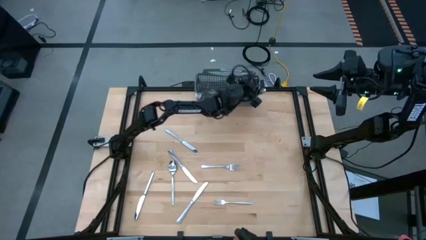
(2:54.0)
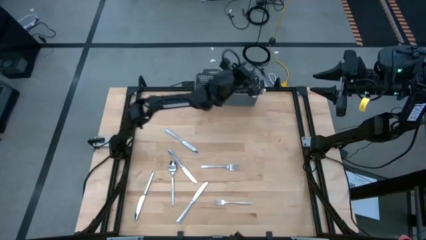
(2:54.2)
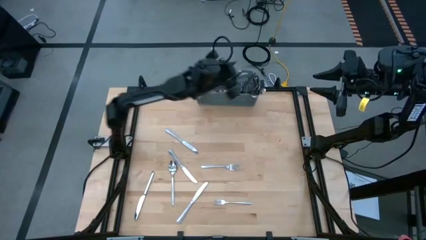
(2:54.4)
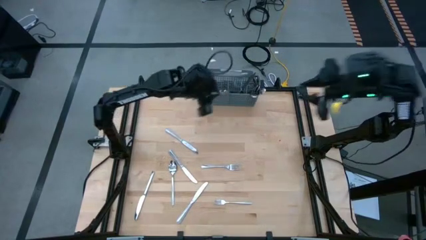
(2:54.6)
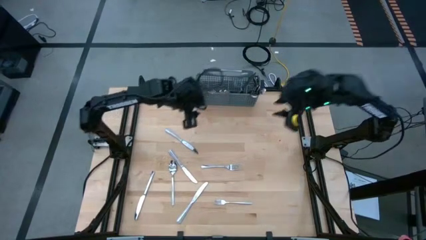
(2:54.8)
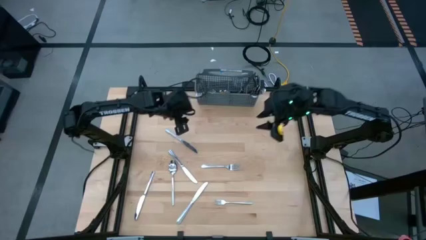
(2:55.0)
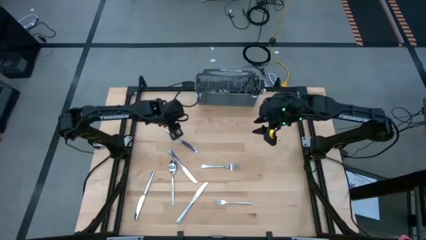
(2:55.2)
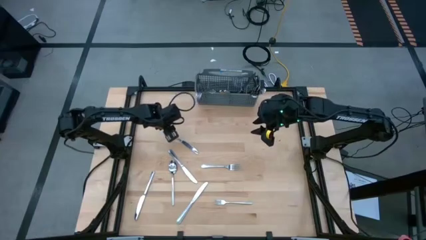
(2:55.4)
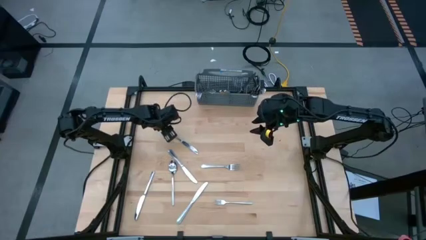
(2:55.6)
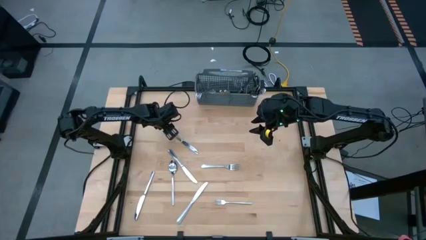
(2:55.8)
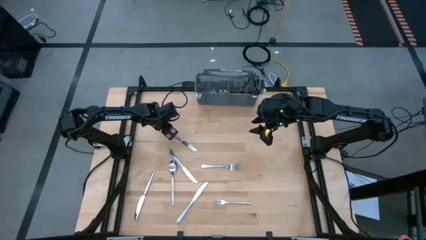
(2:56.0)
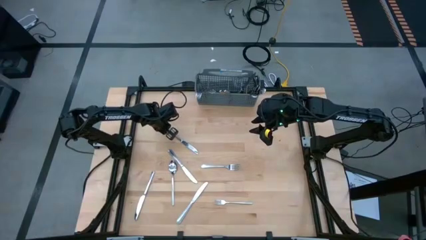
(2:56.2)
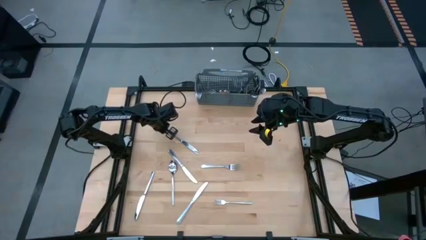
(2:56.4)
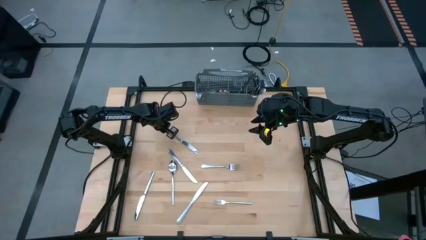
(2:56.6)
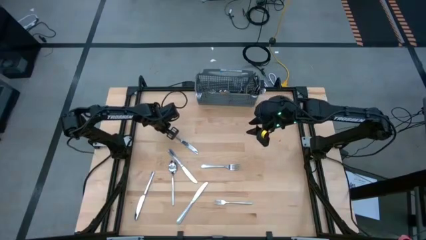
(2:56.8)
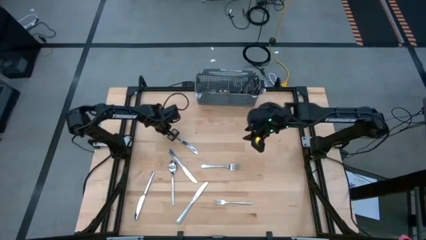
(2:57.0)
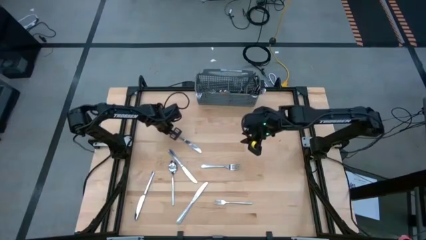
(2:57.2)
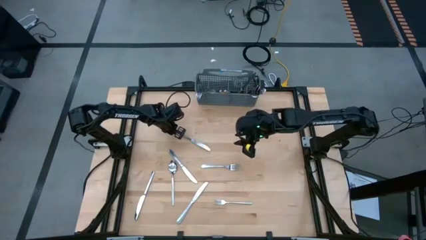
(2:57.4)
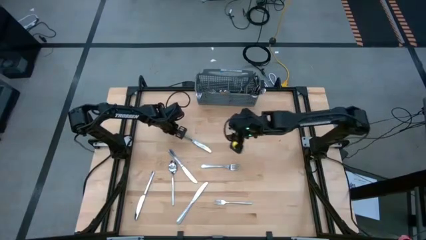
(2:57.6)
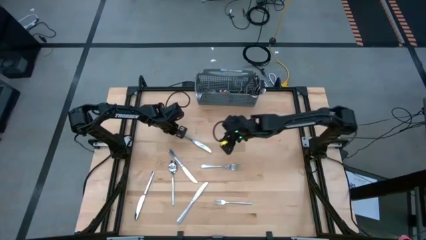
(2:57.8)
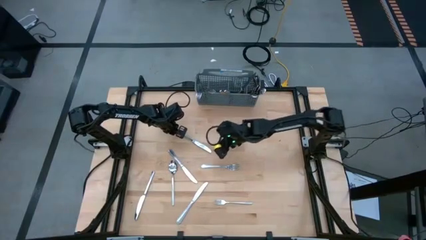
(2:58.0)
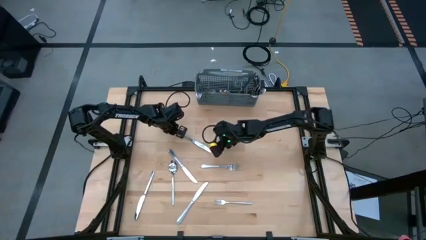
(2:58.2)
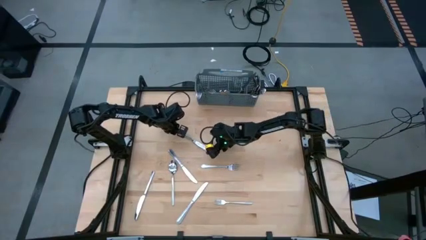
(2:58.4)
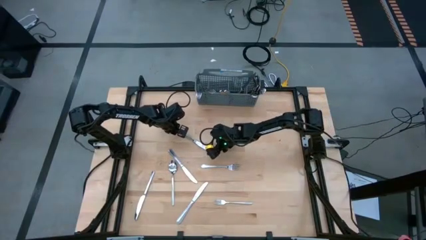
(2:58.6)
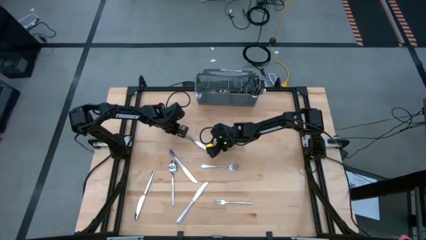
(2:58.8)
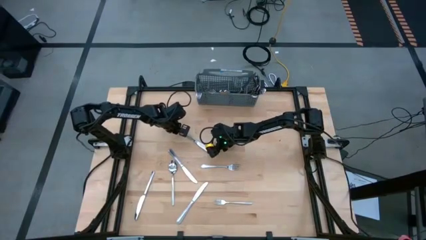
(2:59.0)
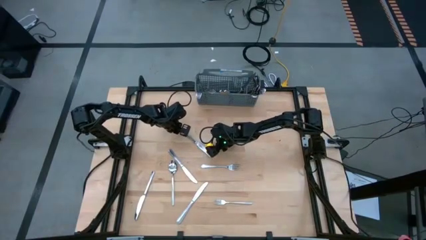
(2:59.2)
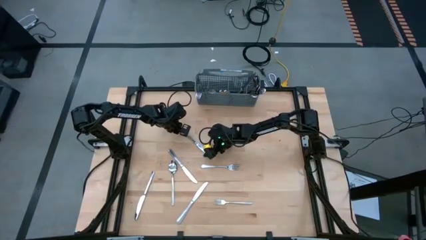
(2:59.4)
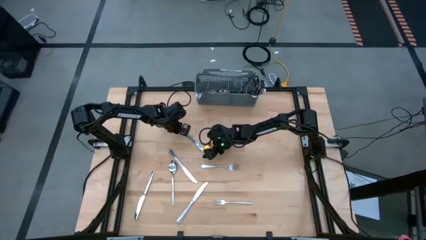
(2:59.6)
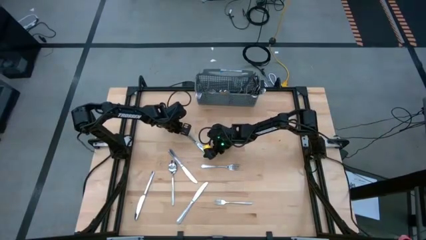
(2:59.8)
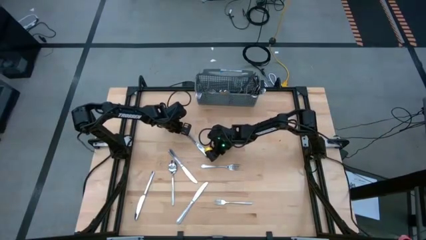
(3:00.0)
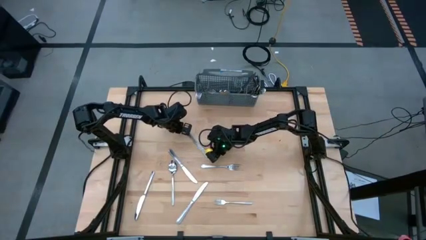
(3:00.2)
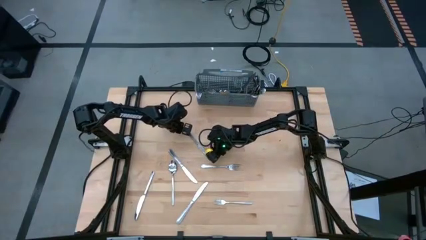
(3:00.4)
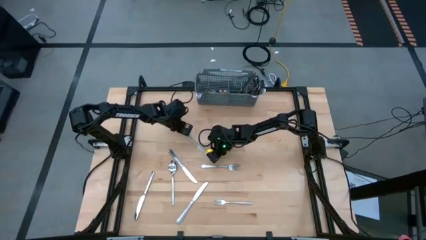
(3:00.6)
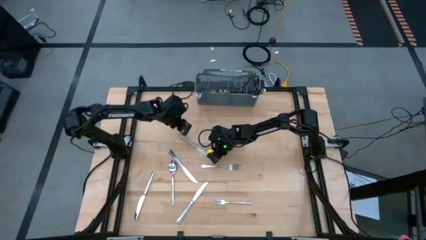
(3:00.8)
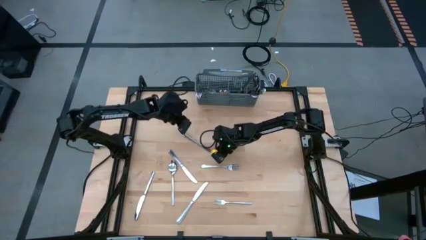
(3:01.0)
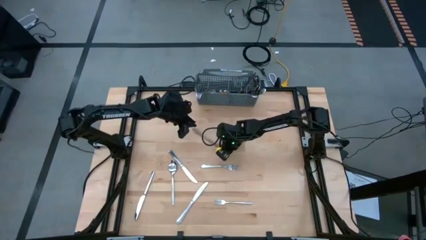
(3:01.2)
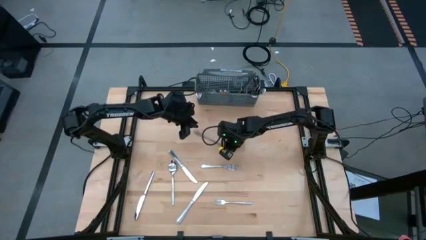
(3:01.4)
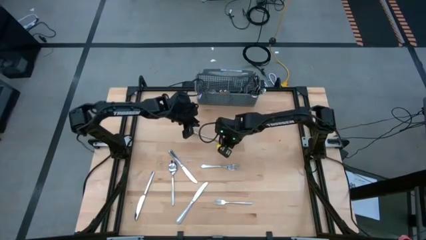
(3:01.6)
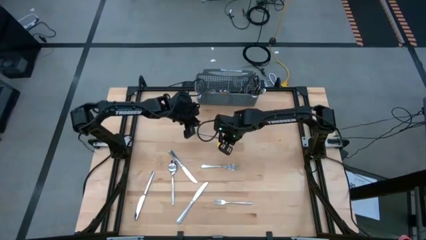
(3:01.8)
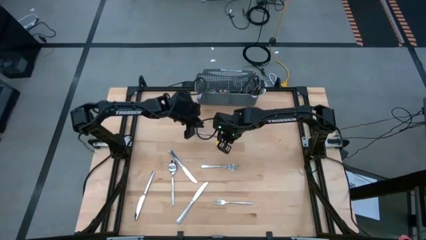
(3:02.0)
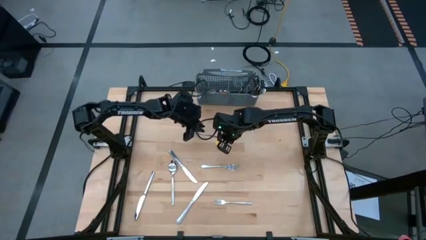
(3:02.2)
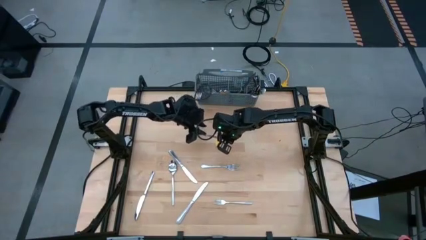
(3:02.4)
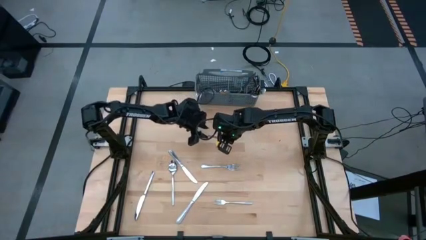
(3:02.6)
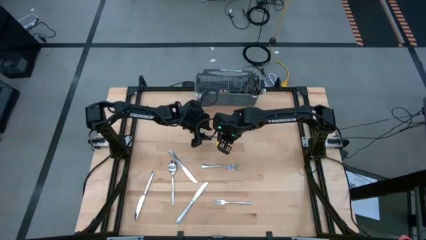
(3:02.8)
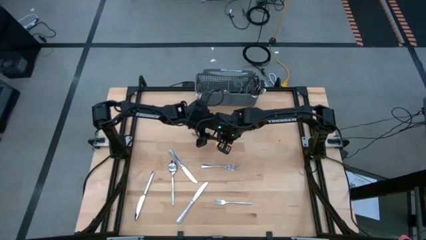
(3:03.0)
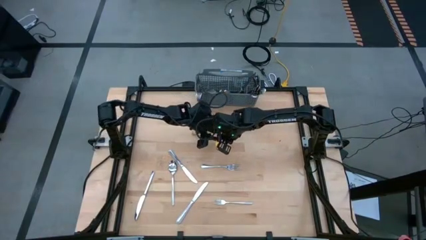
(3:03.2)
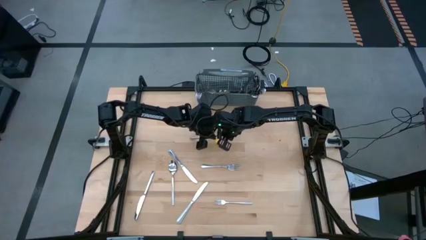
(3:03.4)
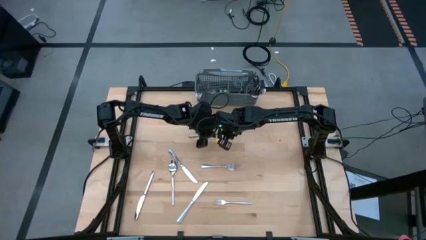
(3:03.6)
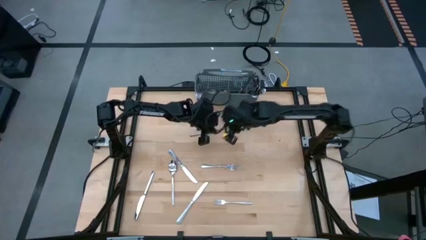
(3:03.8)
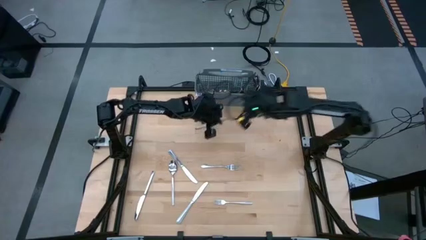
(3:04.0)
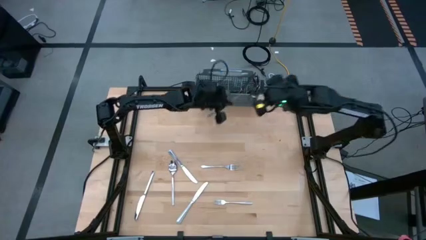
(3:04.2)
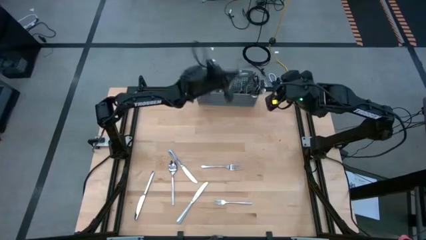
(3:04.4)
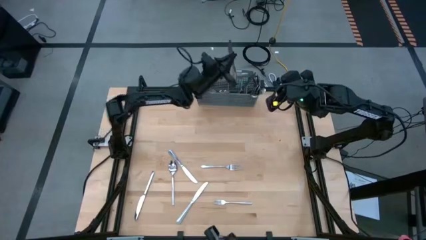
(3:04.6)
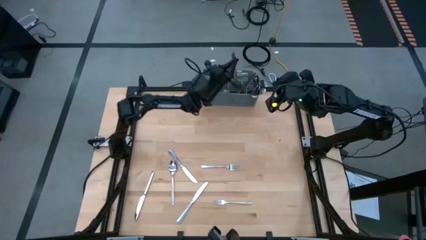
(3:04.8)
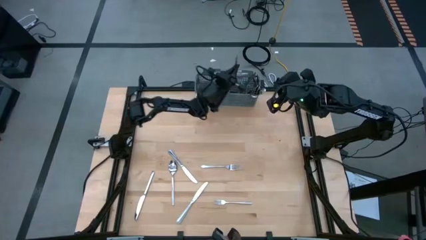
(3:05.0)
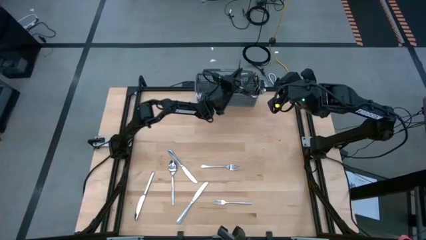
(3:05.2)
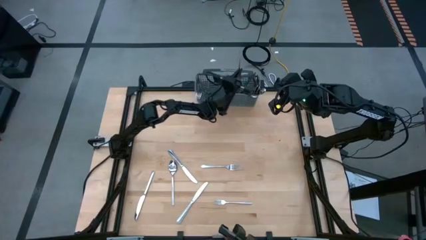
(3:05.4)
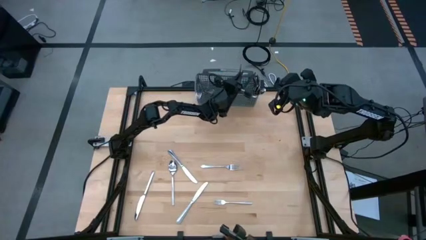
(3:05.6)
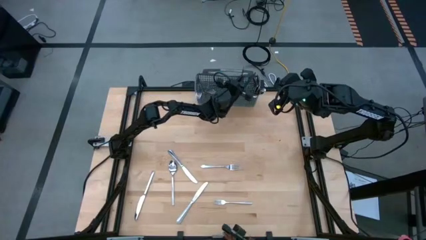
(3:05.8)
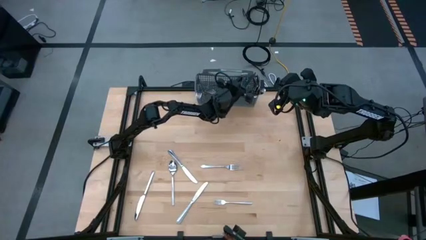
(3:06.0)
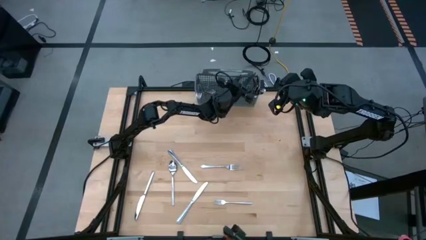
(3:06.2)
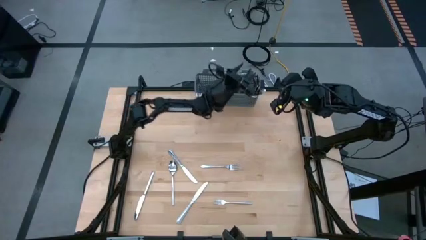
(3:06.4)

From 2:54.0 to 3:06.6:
Task: Sort silverware
Put the silver table knife into the silverware organizer

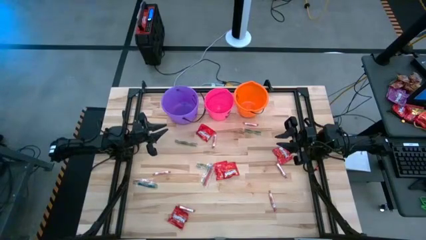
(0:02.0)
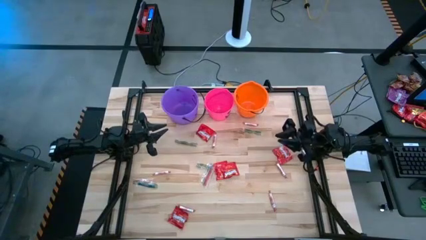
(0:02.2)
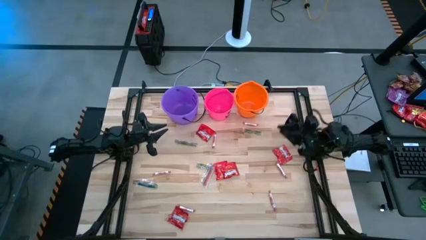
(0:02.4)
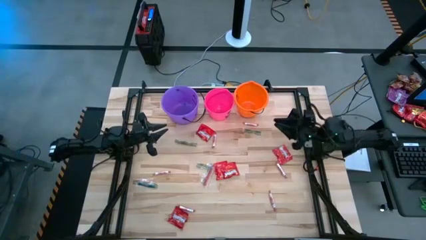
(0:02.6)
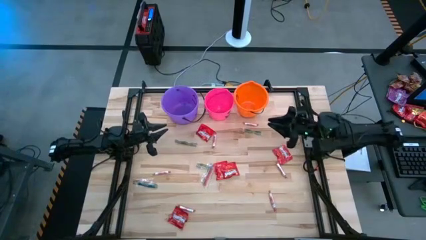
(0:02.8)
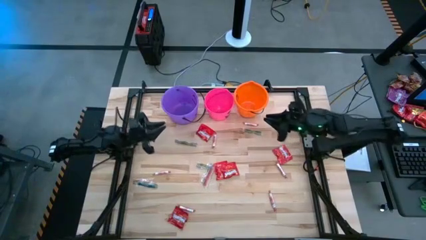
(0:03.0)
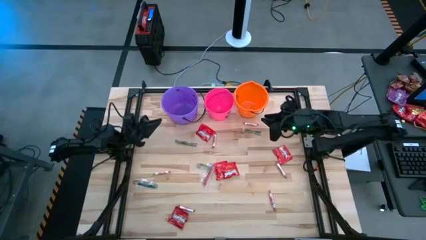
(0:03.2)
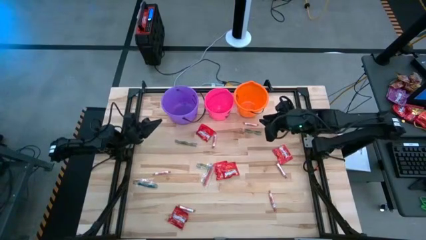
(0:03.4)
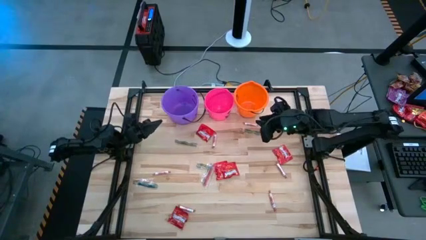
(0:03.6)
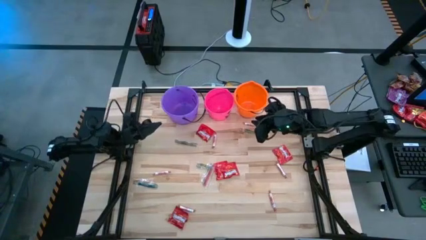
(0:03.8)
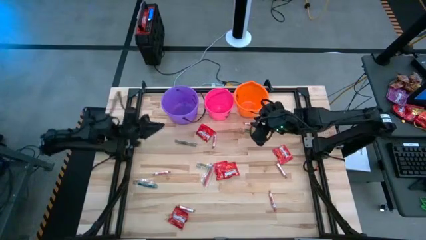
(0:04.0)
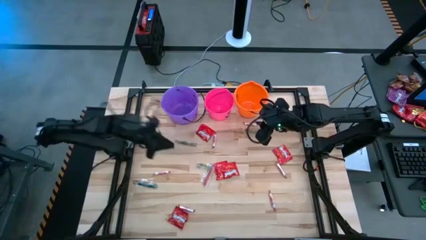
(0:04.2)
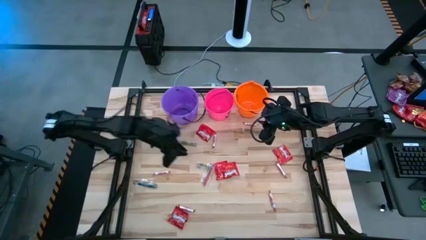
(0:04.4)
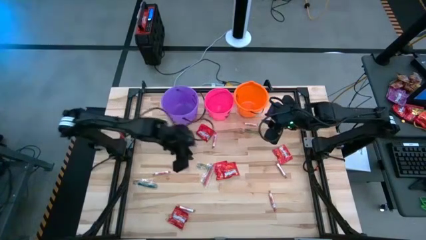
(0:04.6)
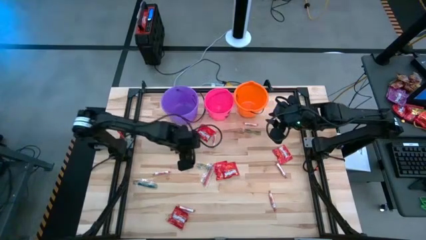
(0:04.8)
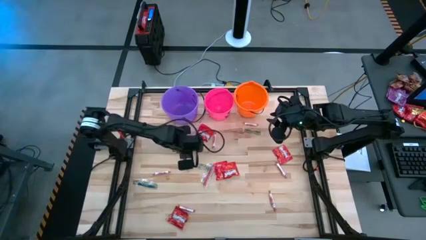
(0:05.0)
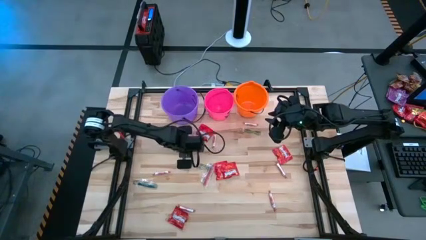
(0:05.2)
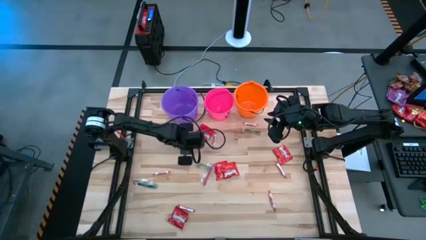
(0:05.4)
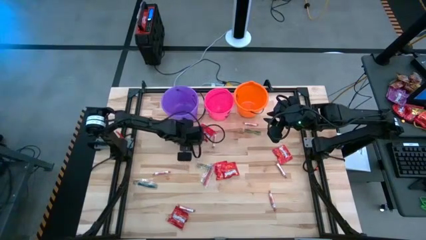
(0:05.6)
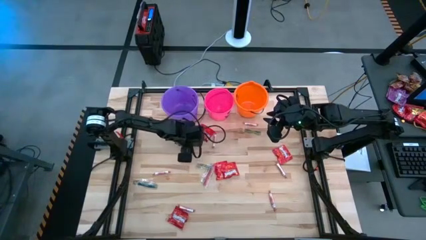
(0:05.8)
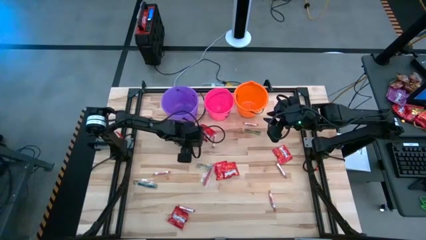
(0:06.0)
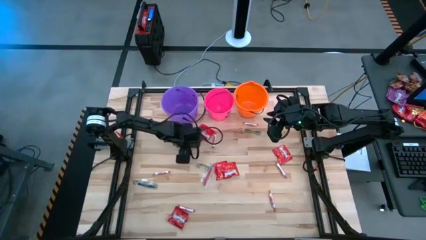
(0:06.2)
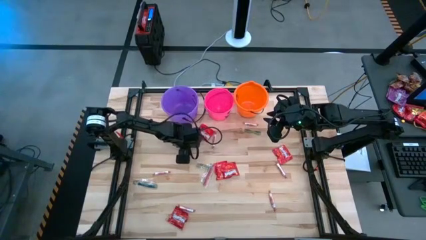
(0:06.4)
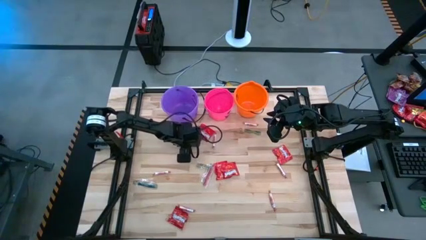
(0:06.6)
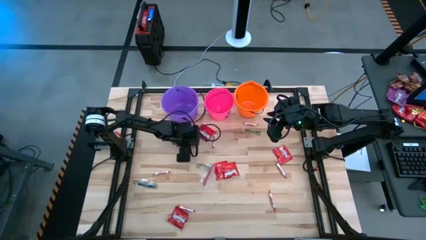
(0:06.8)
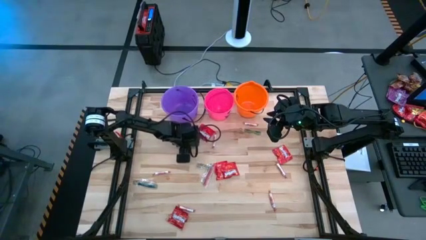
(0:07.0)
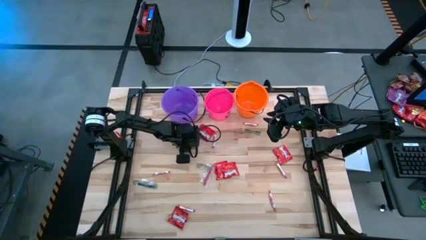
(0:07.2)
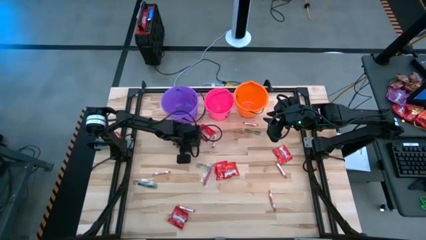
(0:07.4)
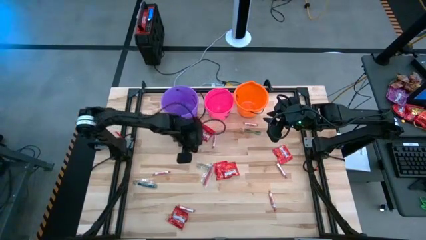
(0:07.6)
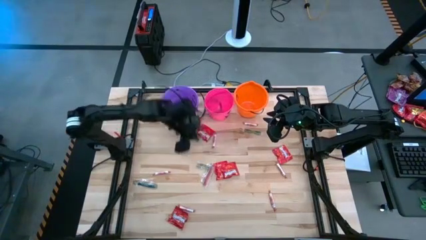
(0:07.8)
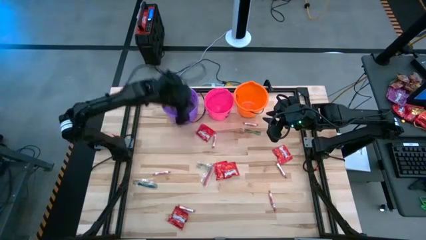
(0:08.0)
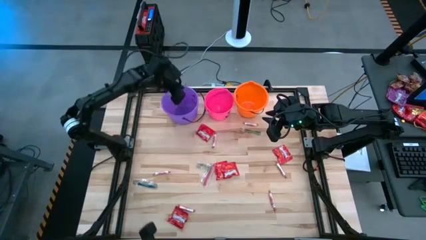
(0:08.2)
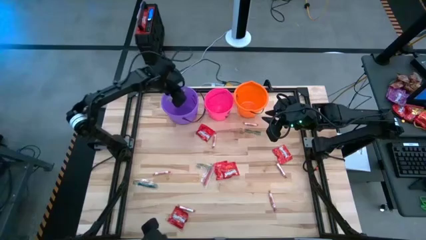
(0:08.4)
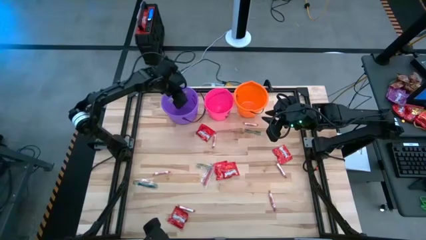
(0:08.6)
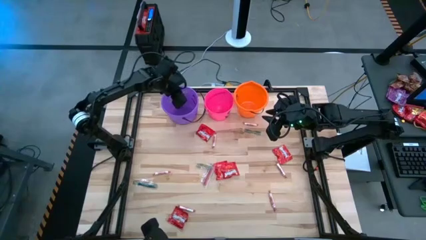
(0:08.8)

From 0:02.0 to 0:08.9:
Task: Sort candy by brand, put in halloween buckets
Put the green candy into the purple bucket
